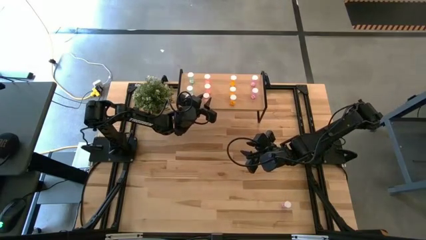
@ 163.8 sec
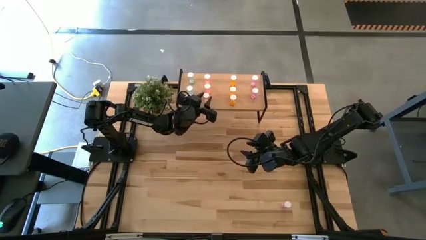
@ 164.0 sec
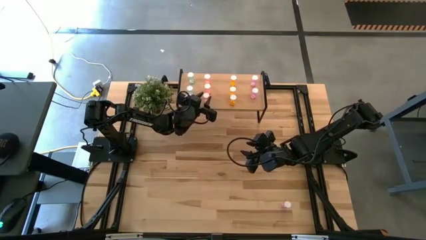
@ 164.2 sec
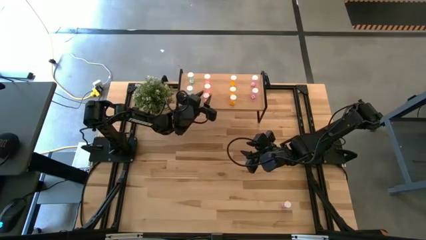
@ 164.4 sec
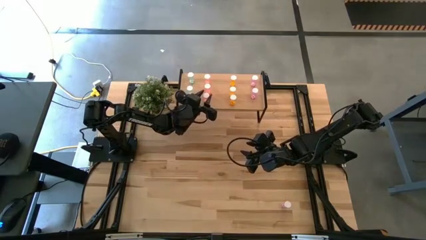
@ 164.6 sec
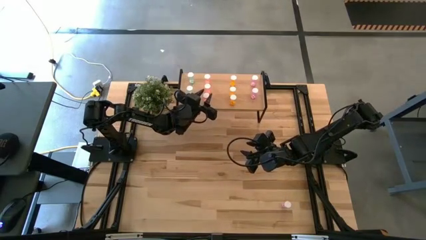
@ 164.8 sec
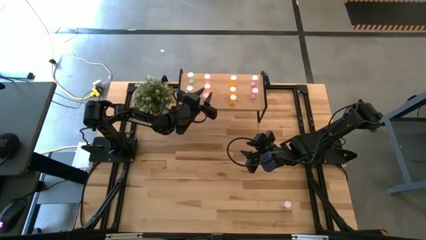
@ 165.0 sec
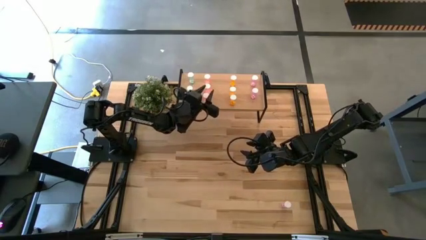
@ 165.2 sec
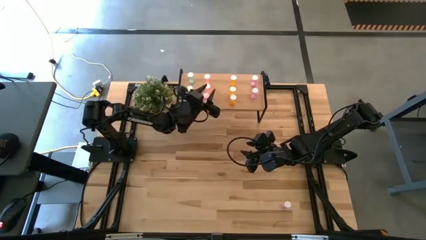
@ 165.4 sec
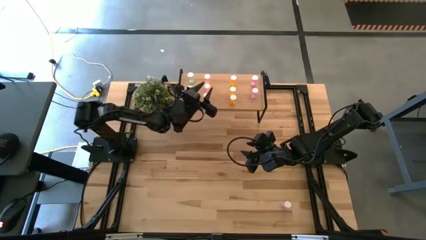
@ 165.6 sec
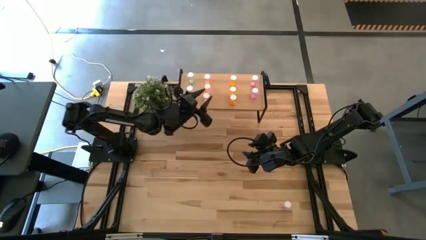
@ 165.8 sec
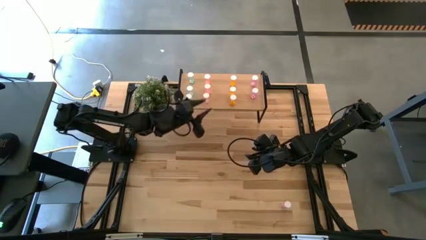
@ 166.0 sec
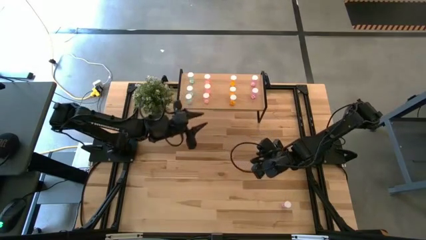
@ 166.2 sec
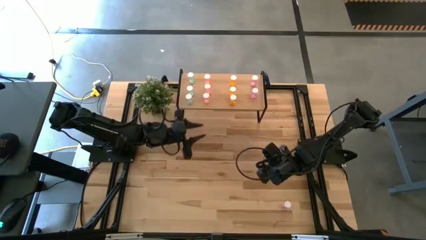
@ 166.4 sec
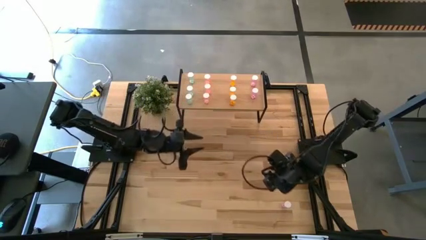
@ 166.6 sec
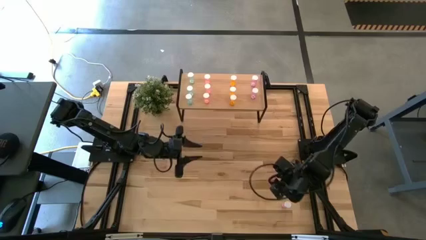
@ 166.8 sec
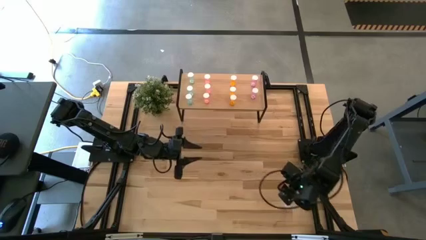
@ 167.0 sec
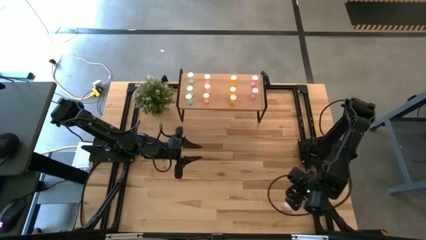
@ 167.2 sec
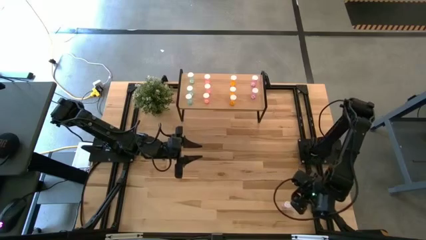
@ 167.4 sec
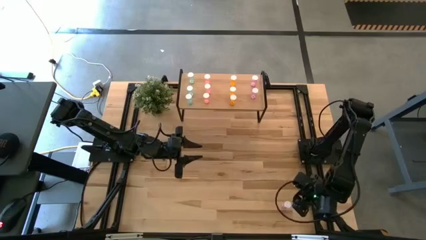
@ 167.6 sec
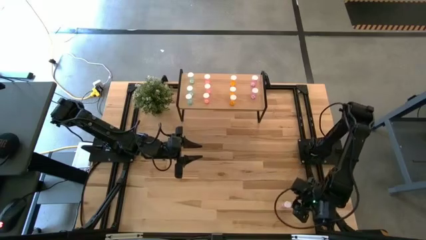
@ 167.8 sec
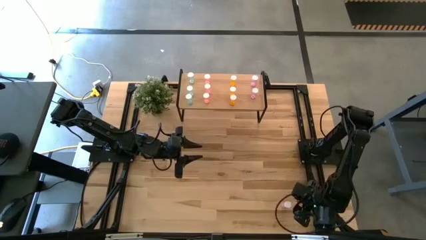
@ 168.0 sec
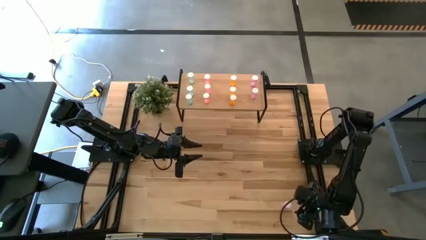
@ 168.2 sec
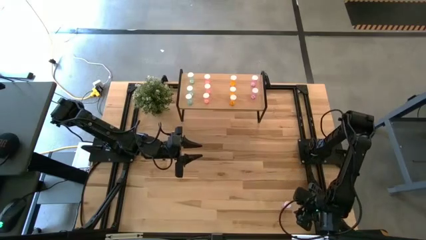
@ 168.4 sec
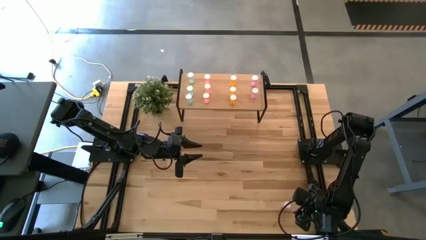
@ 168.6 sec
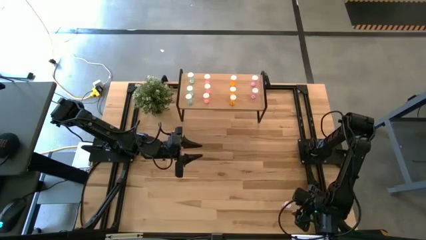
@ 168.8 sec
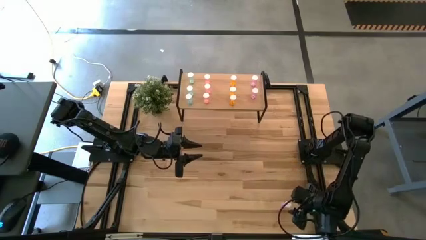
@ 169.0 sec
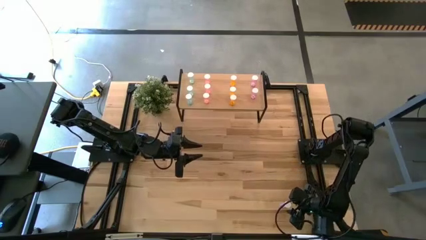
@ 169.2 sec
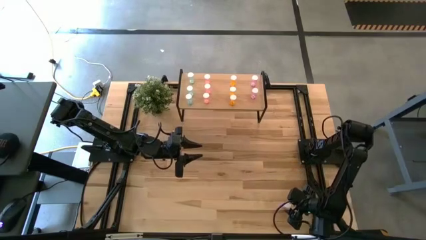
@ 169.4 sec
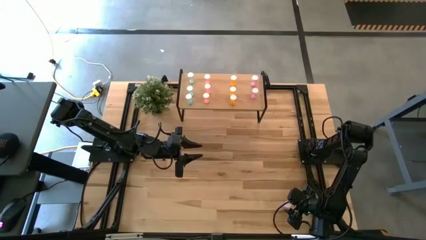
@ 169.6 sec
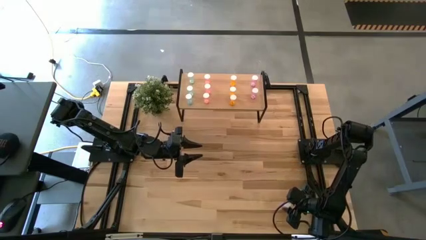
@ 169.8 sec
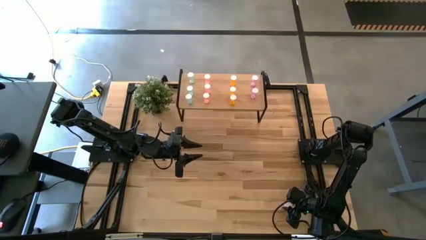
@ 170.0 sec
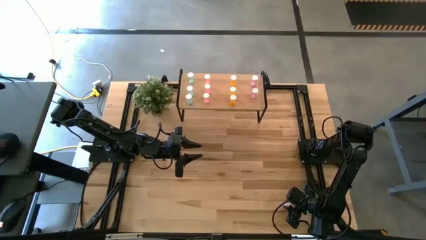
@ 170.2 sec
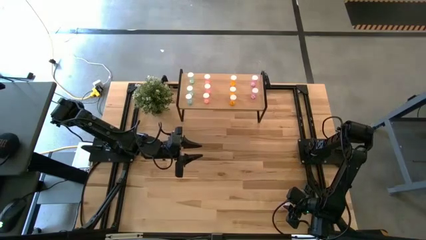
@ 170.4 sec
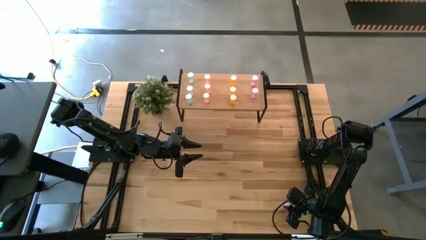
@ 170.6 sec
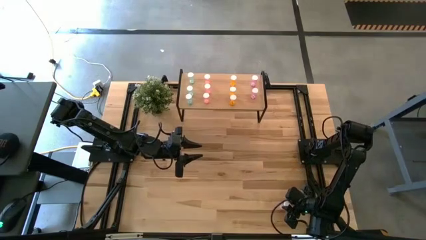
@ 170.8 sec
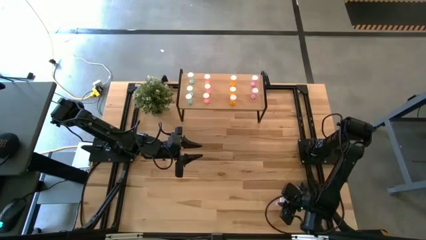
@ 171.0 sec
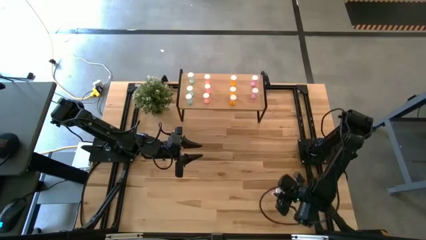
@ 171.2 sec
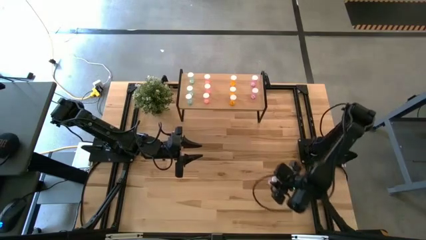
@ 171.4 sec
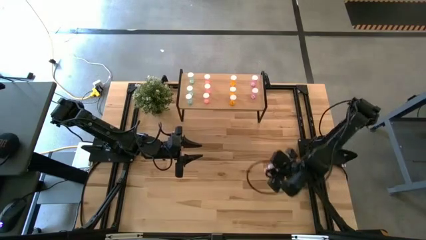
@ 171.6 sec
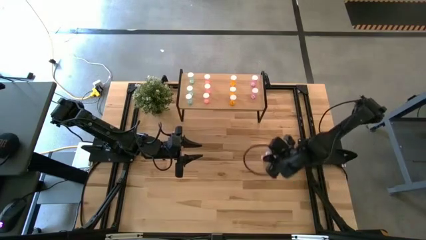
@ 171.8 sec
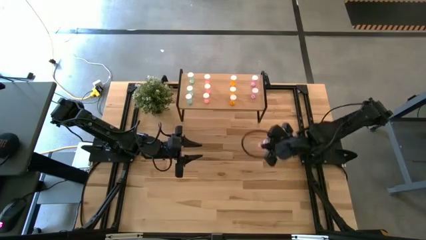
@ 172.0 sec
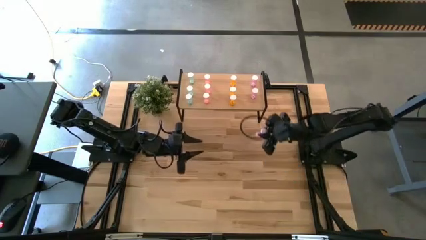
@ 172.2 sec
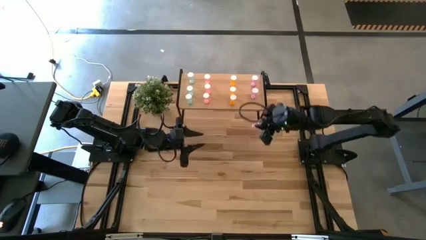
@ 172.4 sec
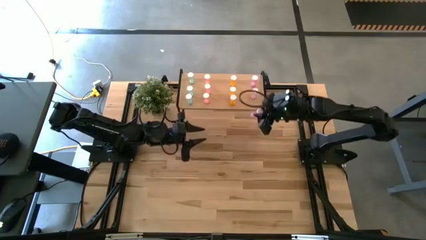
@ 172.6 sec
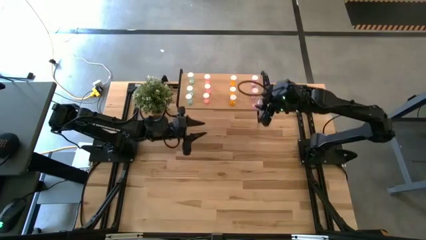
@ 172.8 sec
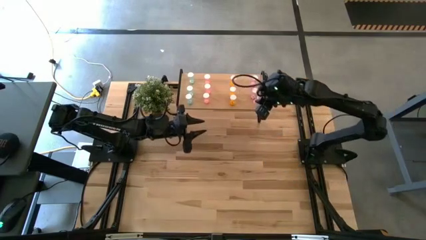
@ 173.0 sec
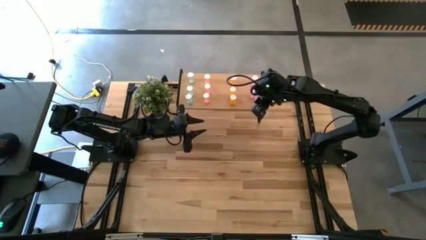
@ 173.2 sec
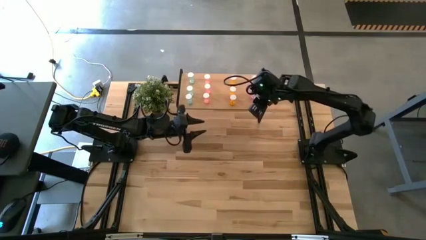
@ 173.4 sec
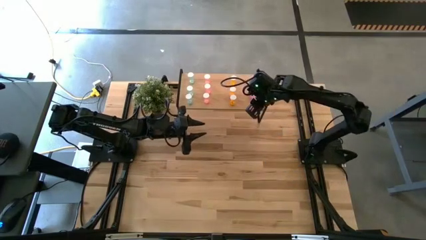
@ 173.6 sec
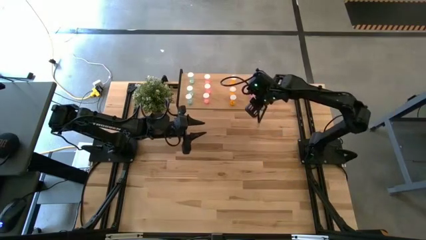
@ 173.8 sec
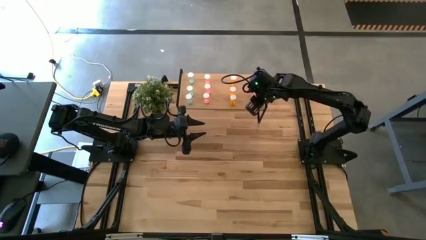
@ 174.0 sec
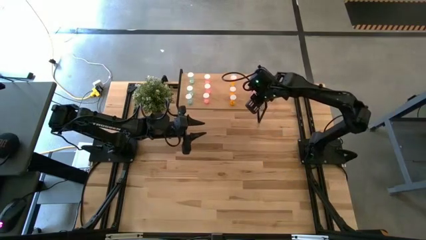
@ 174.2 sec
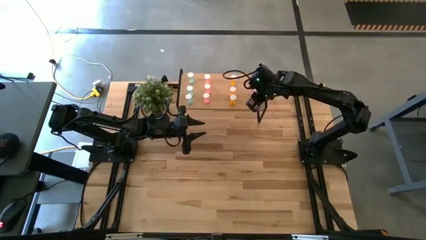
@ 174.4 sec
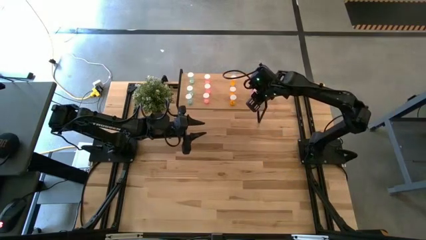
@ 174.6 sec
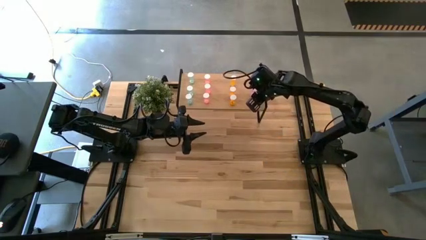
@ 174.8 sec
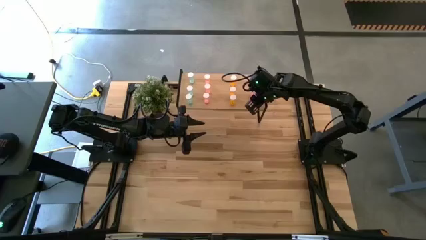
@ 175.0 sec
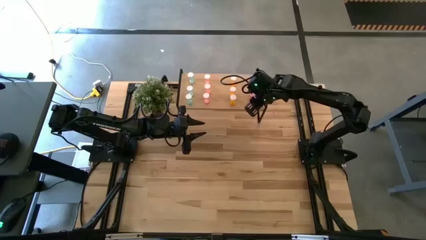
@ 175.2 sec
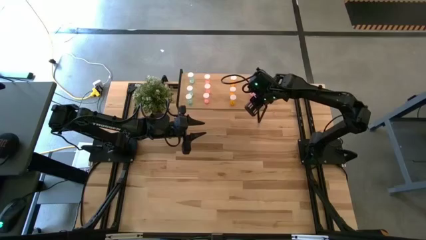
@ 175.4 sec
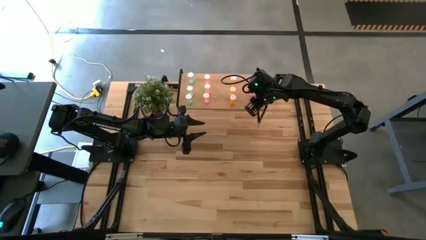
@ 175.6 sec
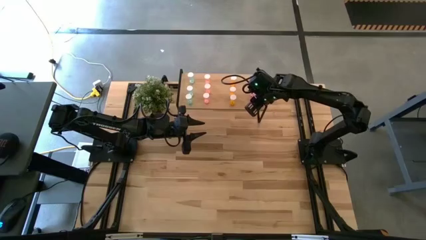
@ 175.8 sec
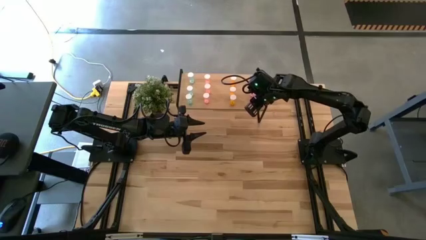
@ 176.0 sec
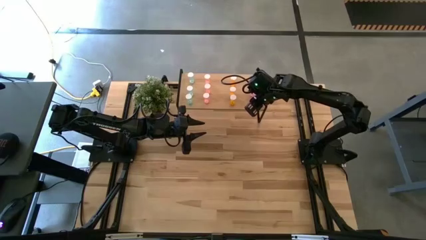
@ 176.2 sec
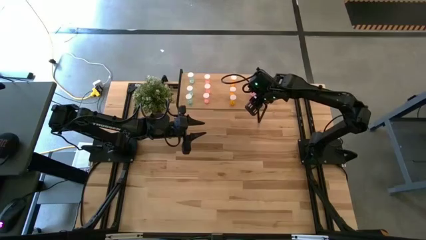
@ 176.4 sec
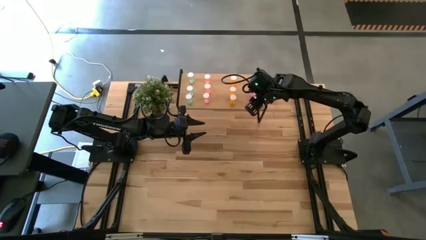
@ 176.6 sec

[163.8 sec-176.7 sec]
Task: Pick and place medicine bottles onto shelf by color
Put the purple pill bottle on the shelf aligned with the other purple pill bottles

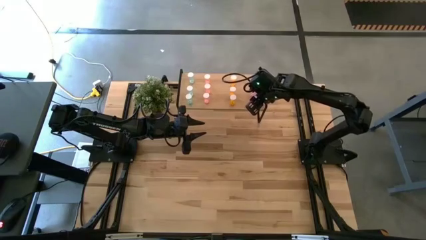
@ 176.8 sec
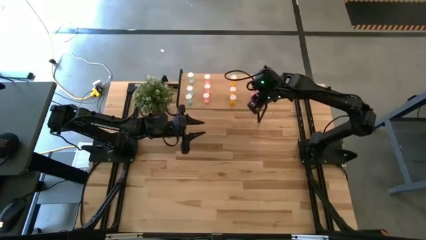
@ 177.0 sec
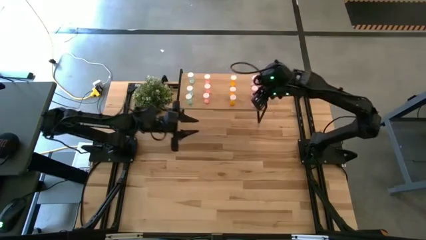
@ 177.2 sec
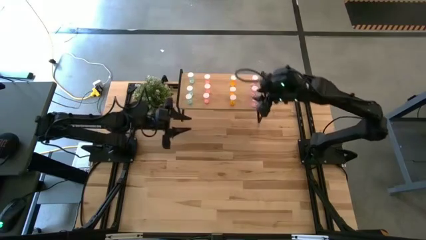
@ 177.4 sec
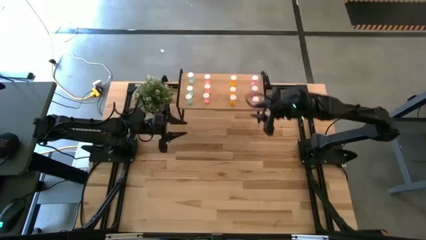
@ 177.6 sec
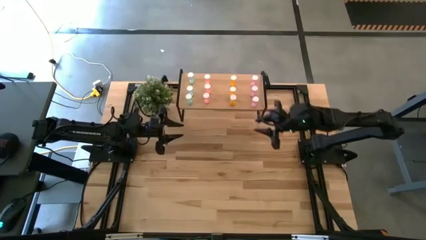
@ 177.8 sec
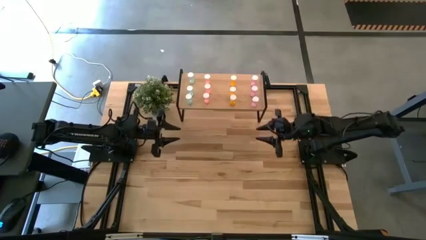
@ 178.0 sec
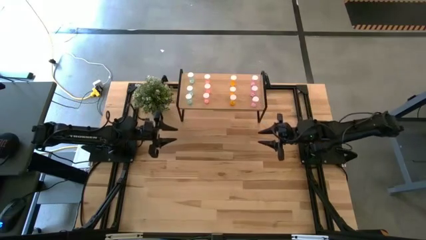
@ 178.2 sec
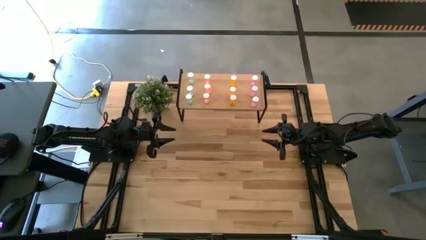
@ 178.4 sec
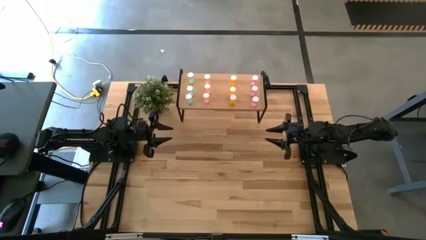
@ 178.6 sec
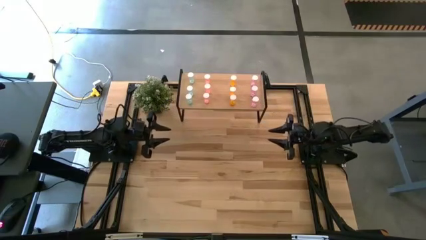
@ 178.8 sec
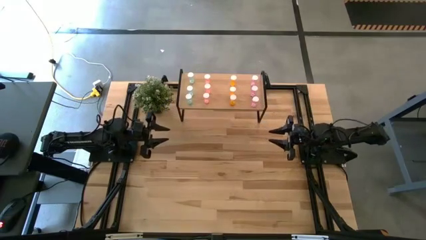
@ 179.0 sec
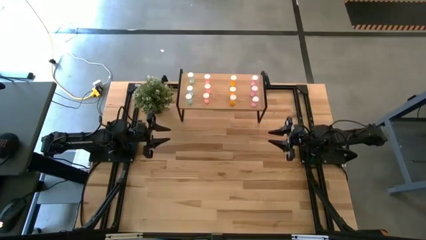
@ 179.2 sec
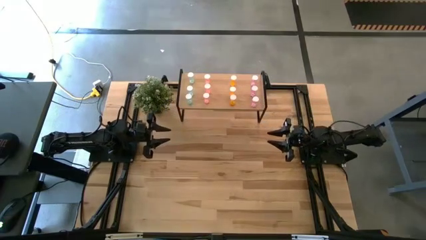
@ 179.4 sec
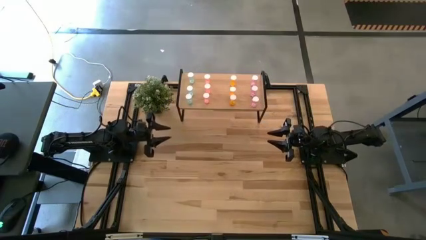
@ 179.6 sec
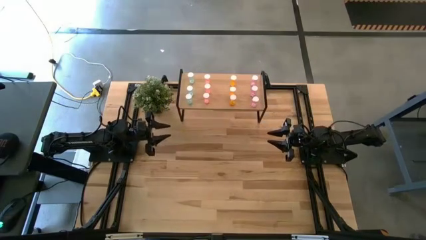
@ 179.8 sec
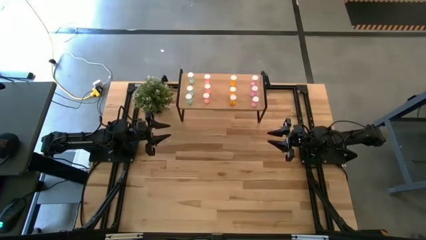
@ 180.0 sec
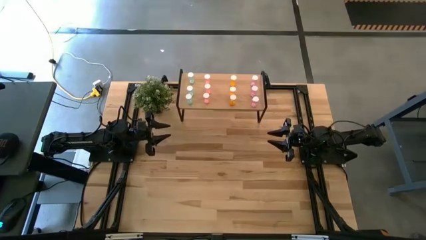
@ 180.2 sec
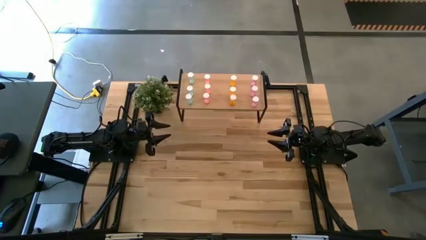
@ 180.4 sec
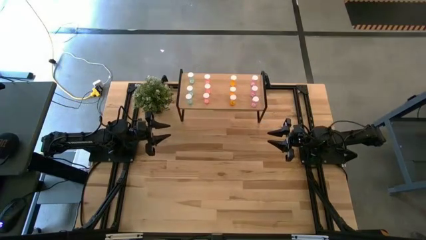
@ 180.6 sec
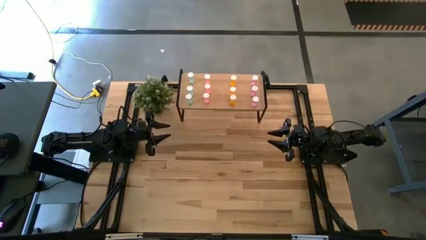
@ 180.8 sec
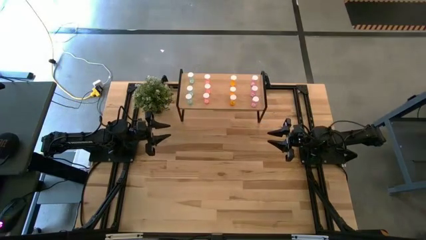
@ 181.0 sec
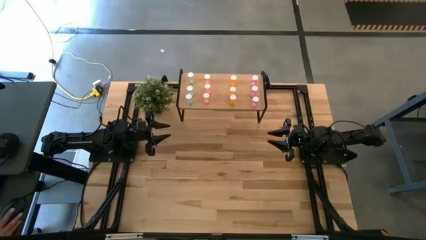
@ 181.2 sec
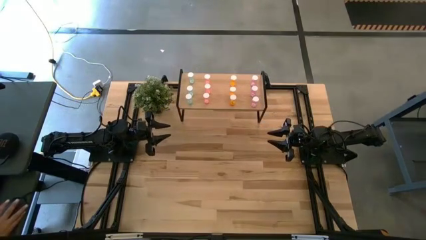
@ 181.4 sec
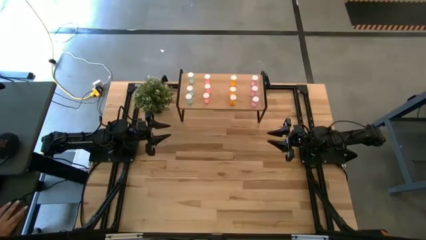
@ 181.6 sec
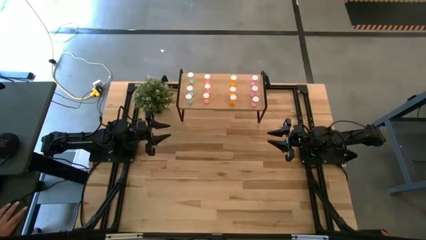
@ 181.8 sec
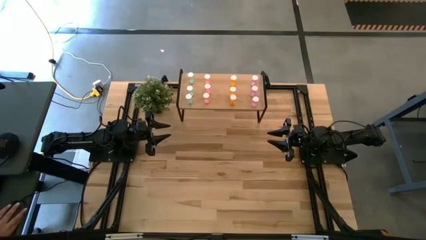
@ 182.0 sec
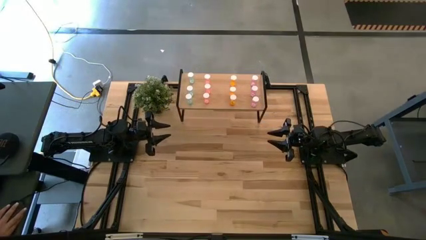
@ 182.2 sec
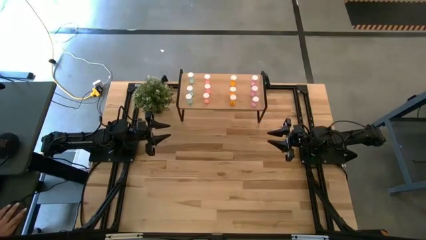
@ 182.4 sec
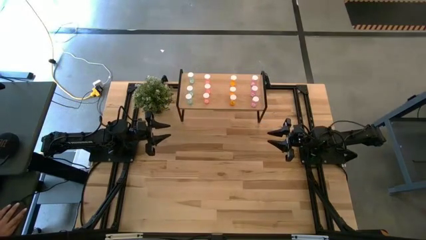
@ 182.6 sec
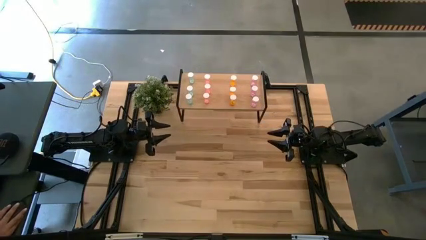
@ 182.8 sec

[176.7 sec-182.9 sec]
Return to Home Position
